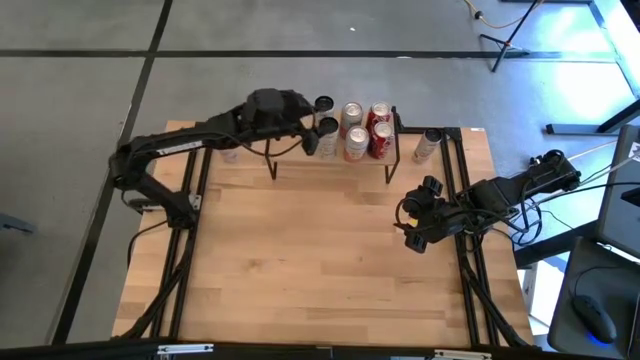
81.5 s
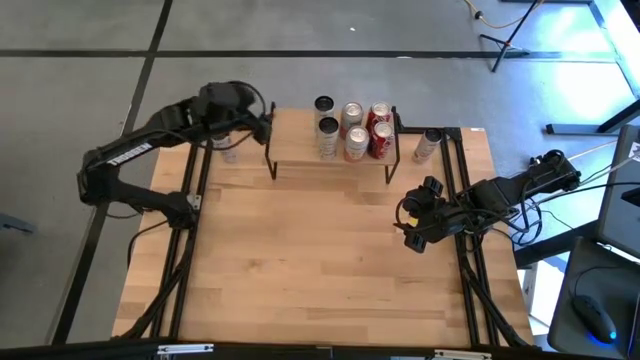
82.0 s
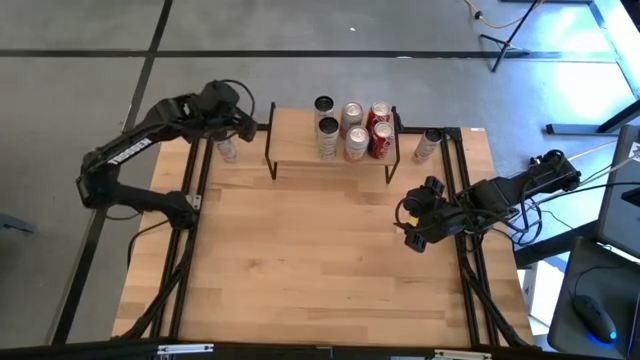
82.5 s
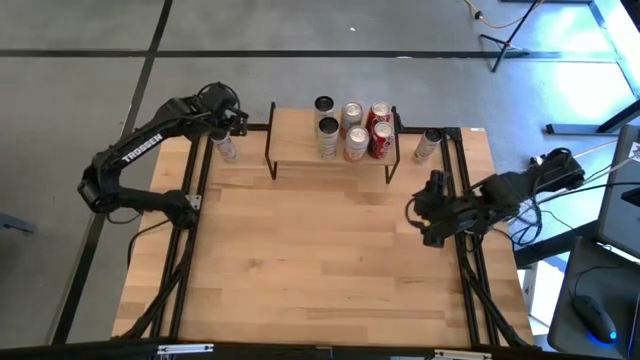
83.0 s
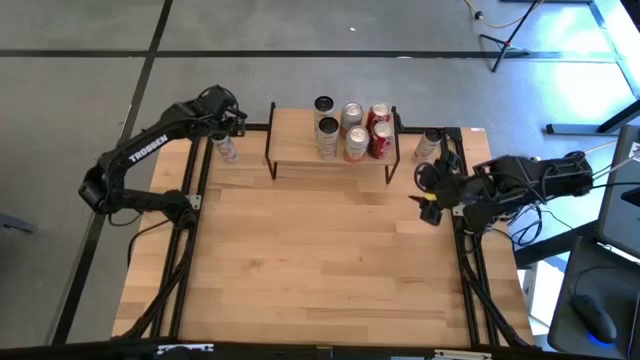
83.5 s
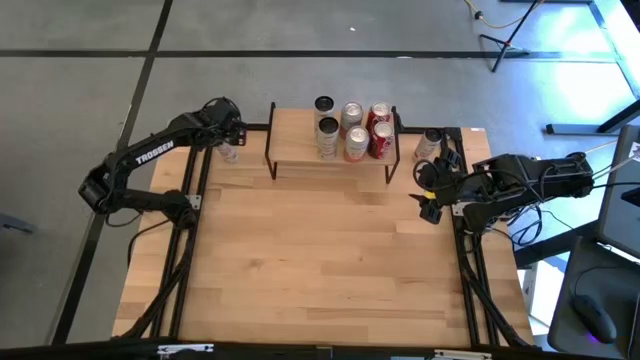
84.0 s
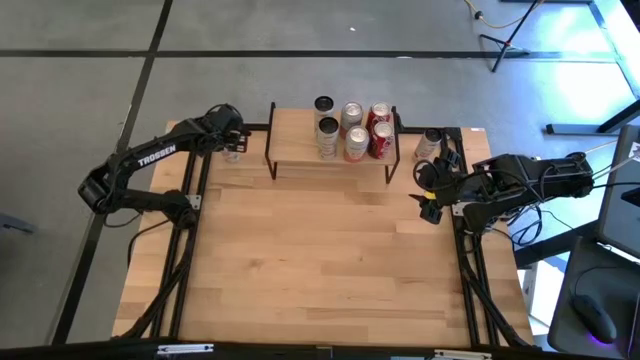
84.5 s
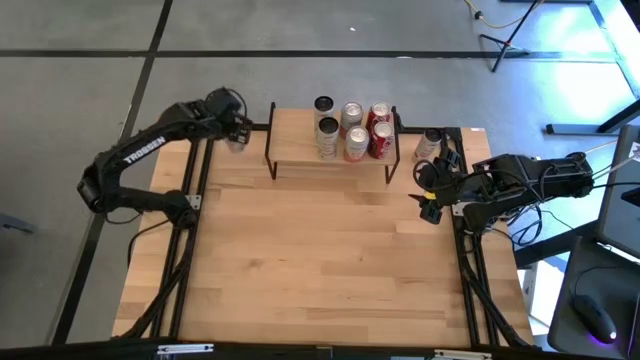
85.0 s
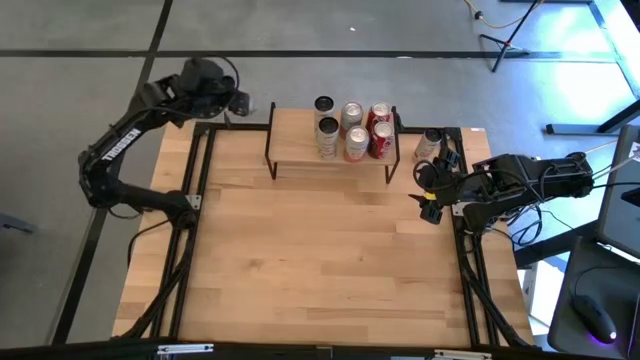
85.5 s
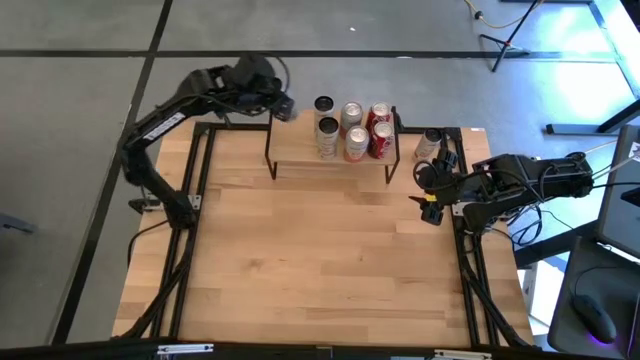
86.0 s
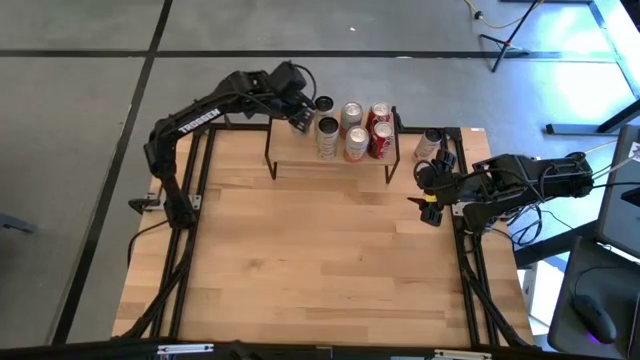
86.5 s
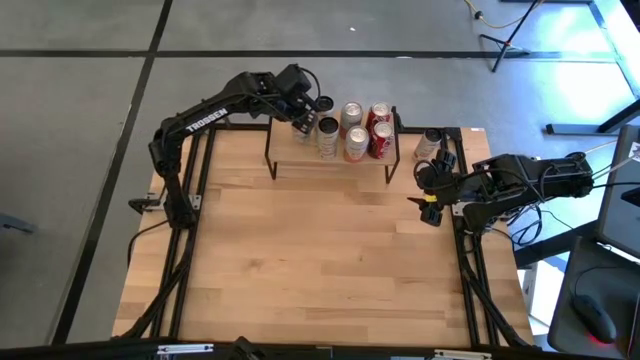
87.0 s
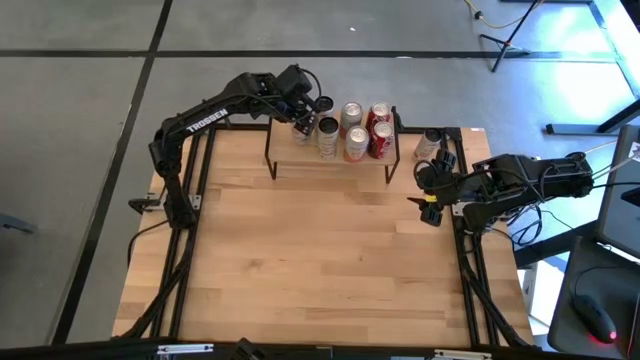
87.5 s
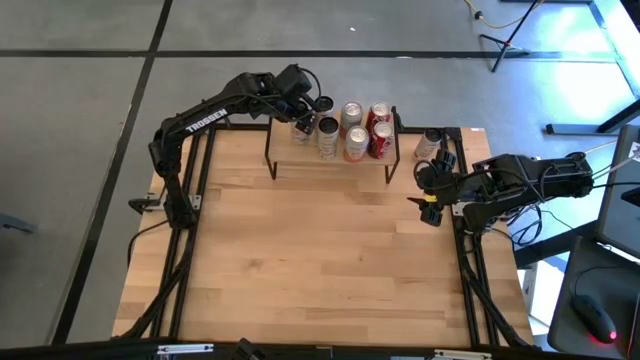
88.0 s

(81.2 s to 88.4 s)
Task: Place canned beverage on shelf
Put the left white pink soda can on the shelf

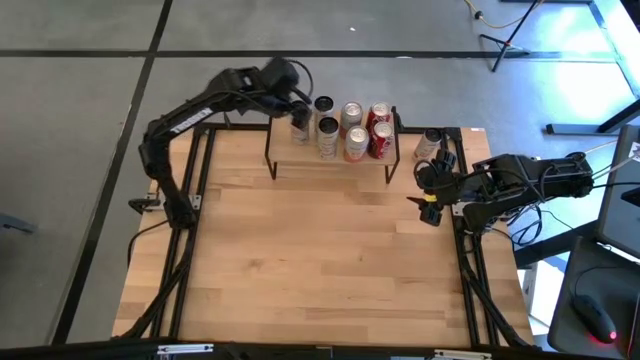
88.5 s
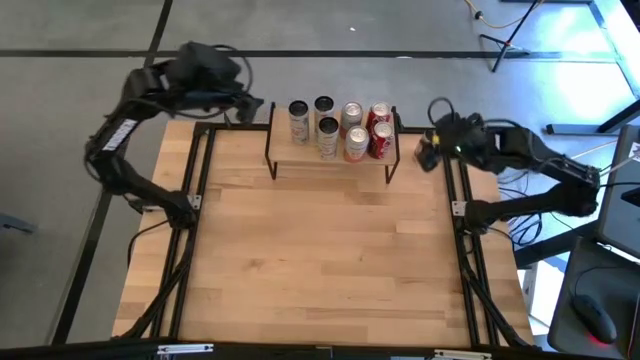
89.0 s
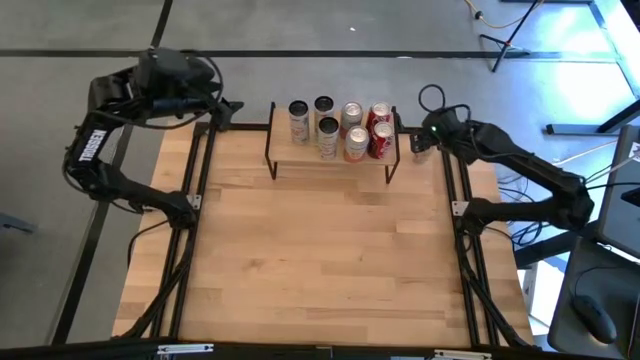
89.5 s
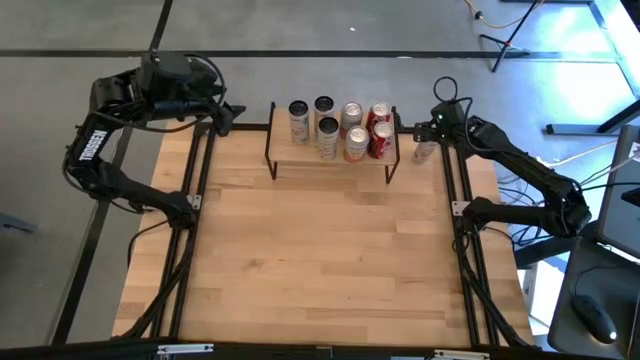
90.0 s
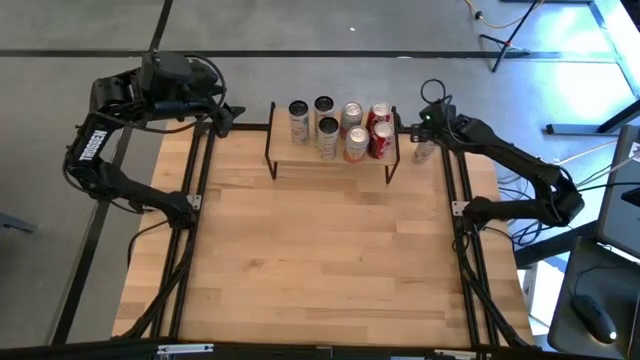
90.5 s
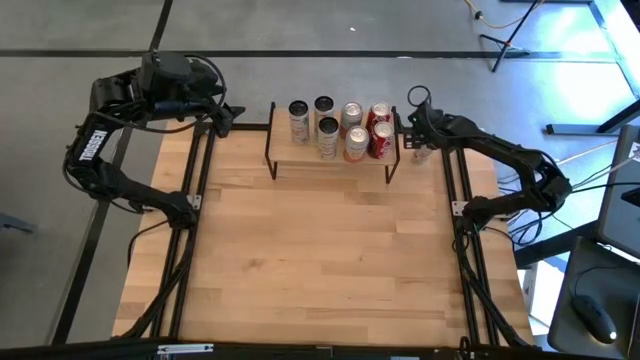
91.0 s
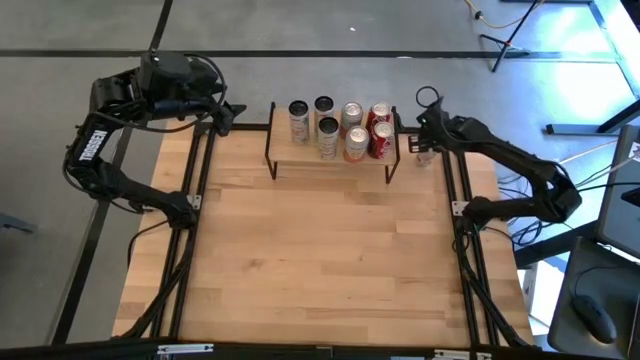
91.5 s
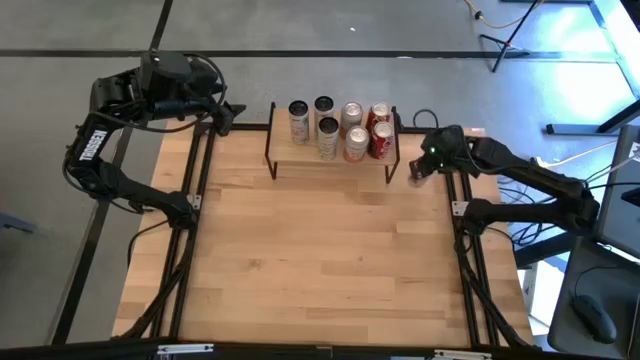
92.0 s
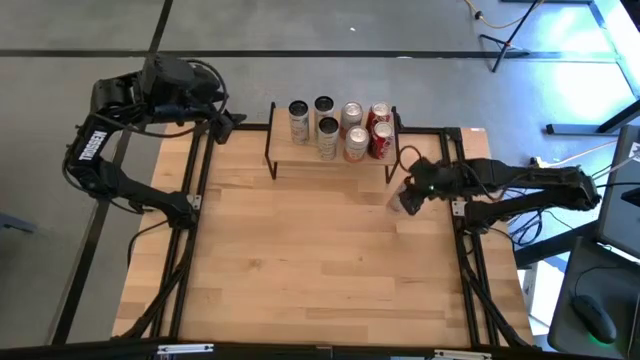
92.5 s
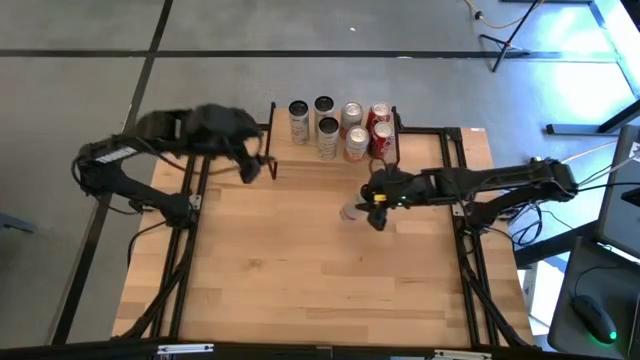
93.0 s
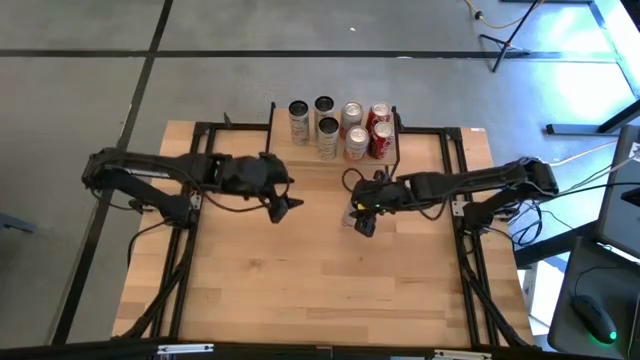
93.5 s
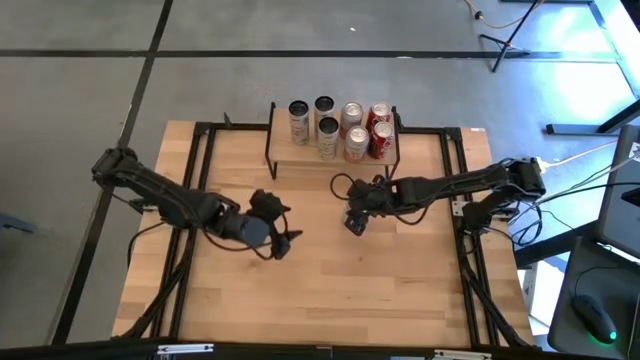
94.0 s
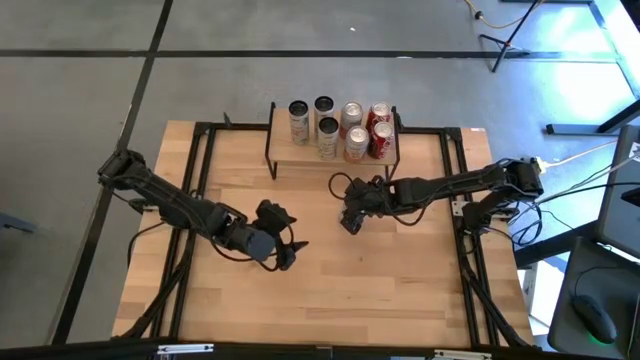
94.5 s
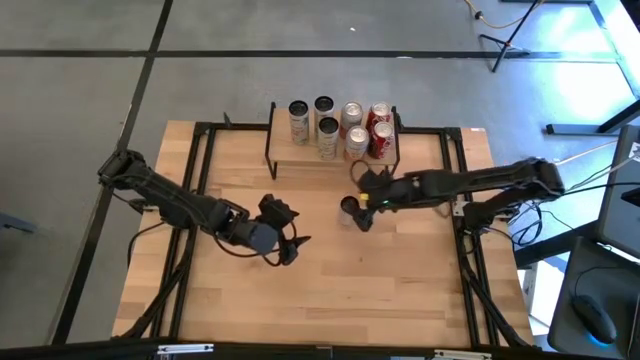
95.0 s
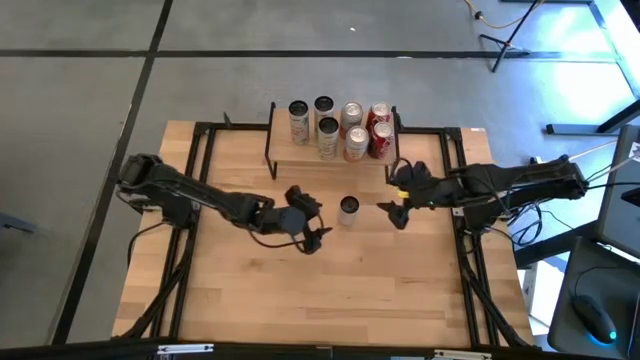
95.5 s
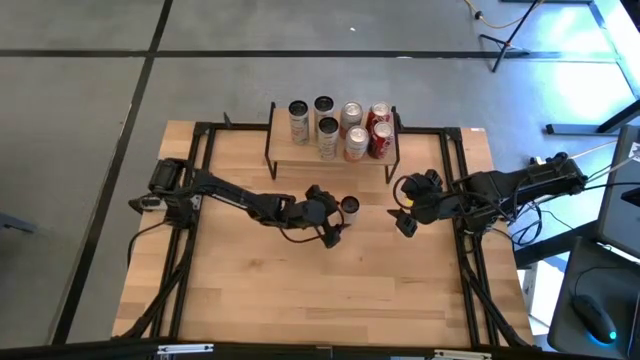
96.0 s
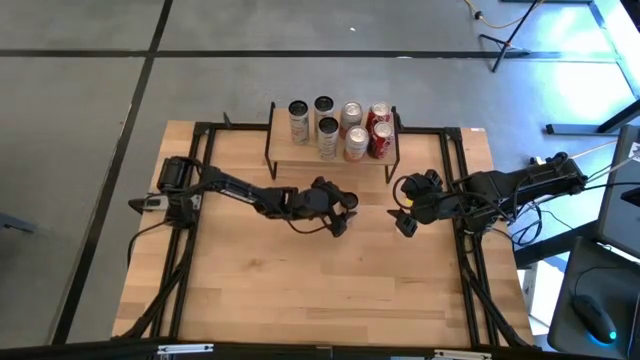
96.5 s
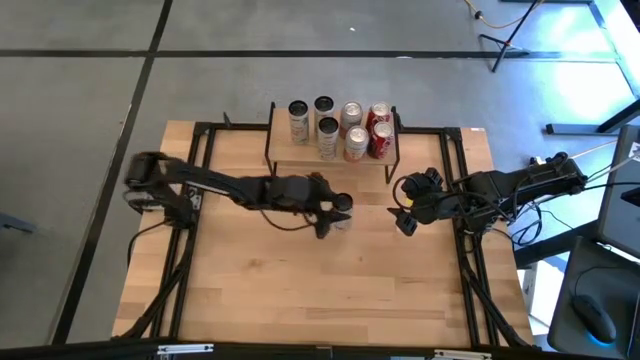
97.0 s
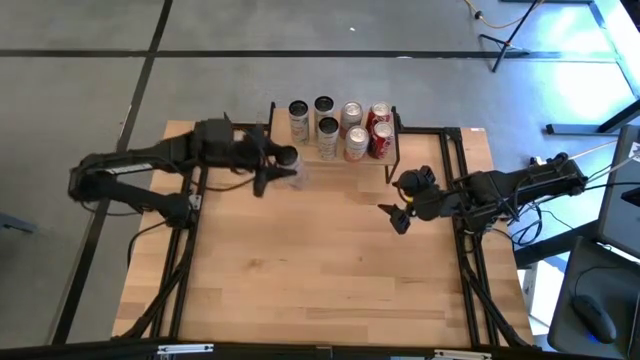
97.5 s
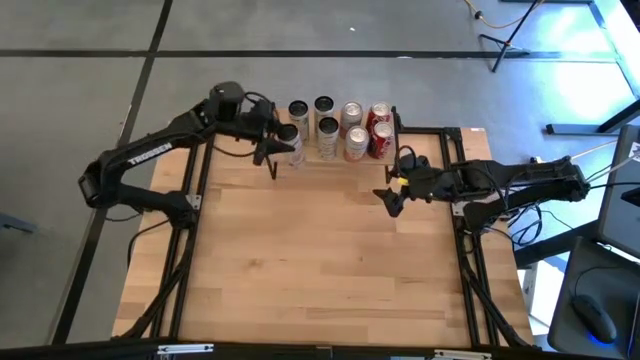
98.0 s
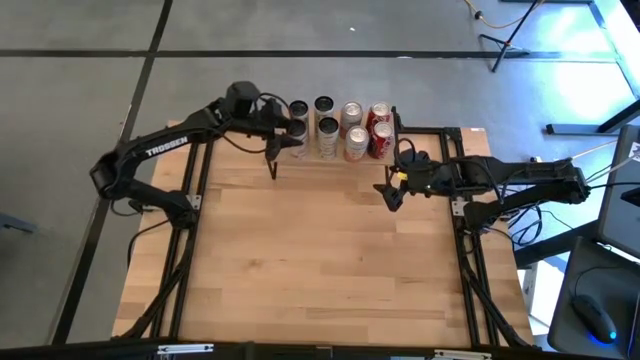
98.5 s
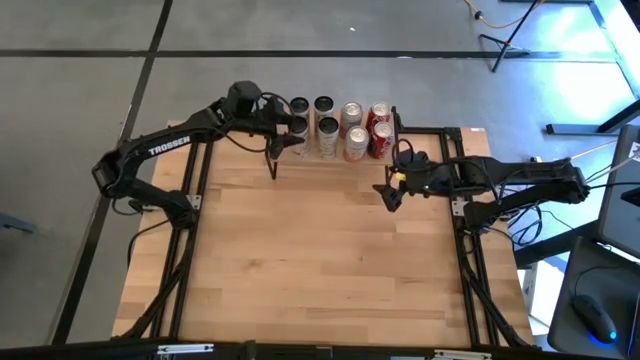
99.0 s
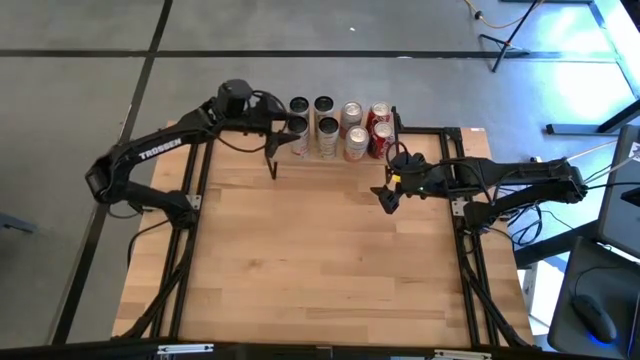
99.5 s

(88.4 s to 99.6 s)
Put the white pink soda can on the shelf aligned with the other white pink soda can

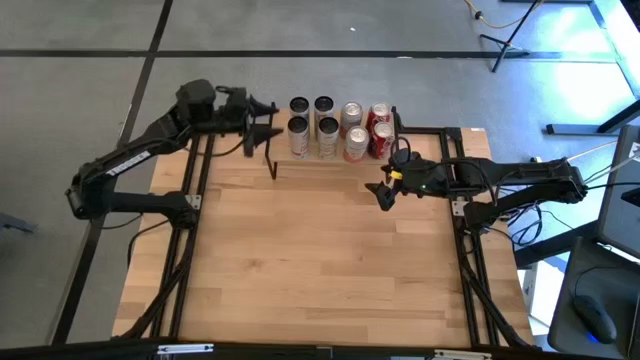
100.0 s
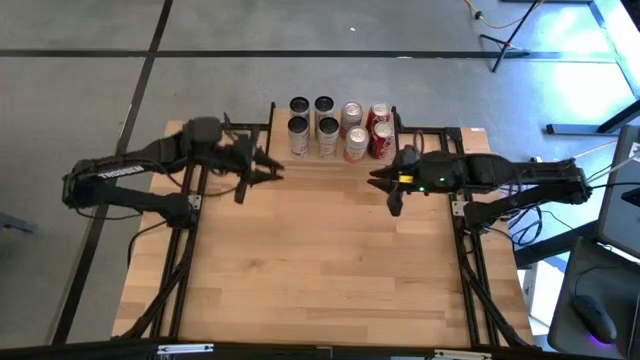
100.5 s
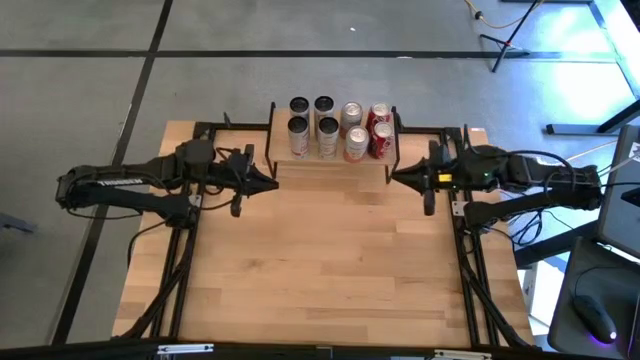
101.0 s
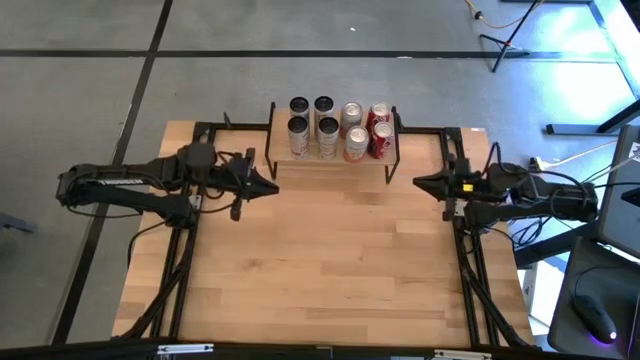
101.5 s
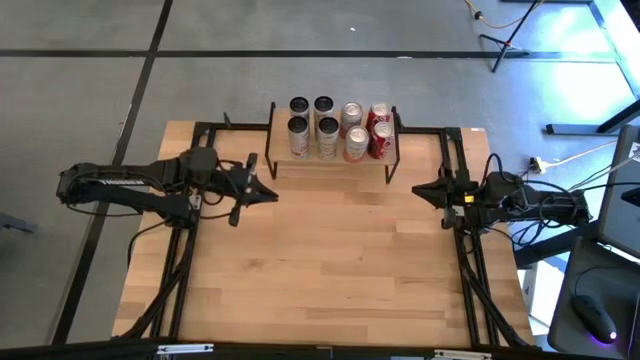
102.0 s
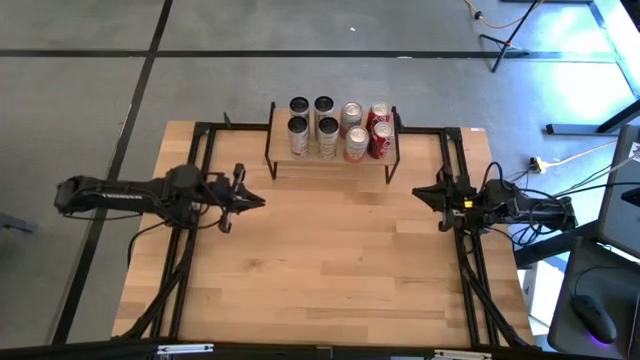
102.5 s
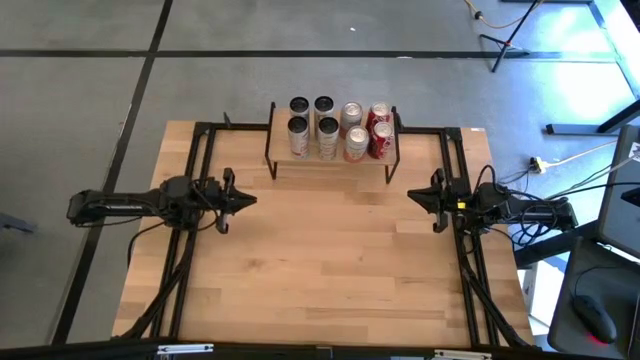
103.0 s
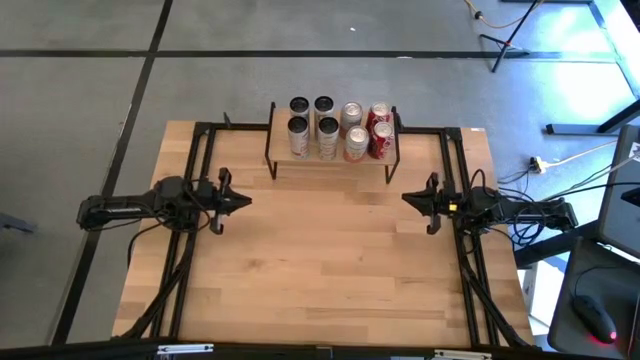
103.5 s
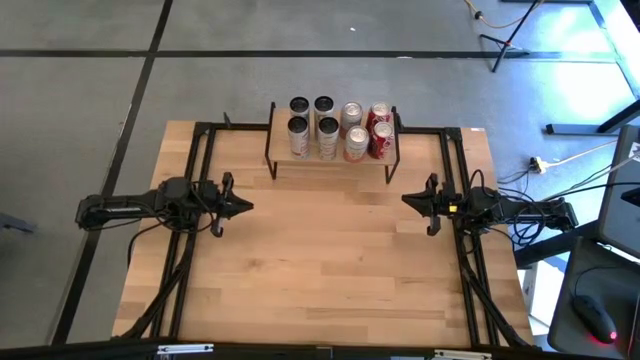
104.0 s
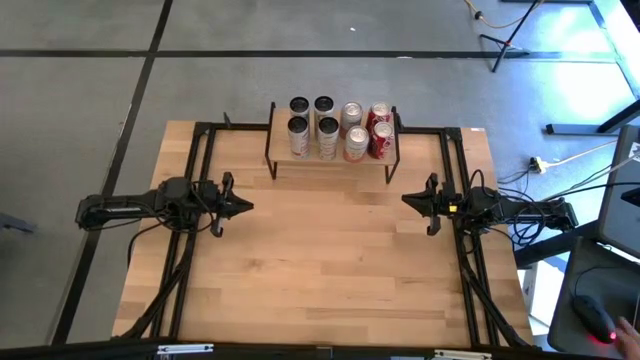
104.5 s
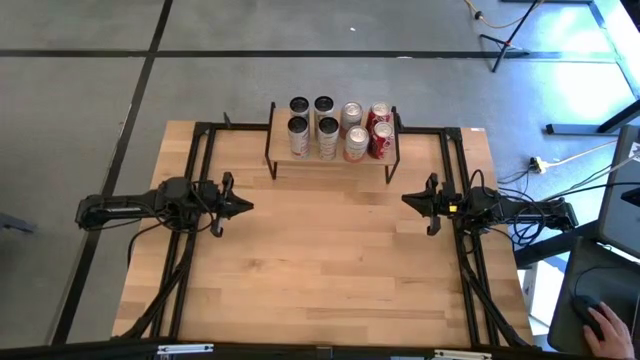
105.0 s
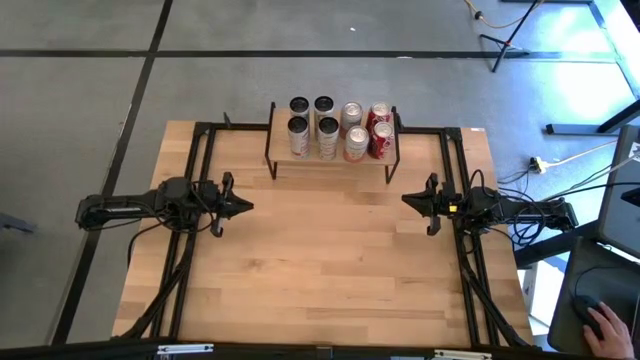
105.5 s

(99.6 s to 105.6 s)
Return to Home Position
